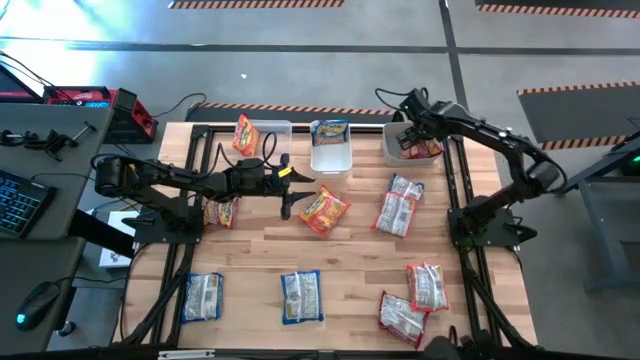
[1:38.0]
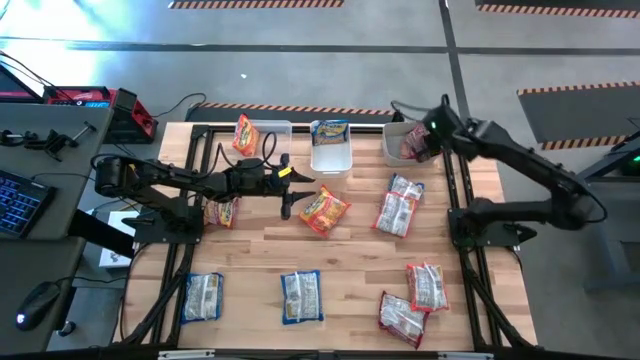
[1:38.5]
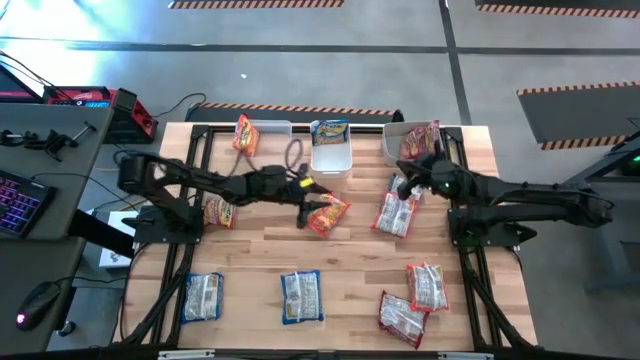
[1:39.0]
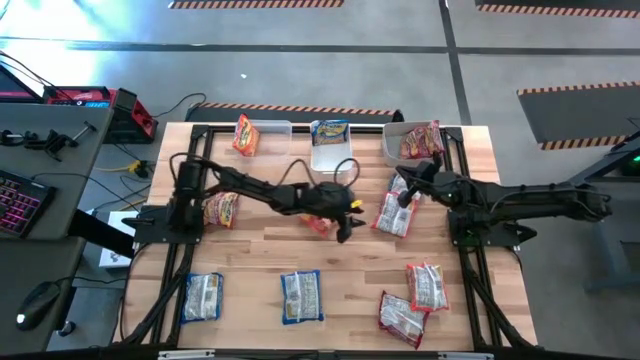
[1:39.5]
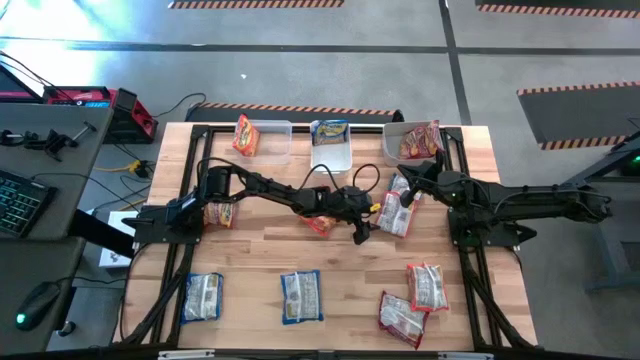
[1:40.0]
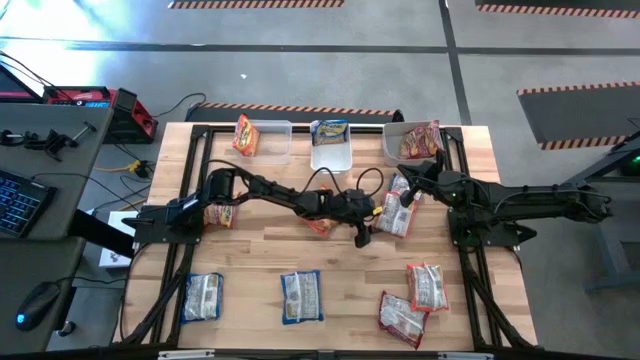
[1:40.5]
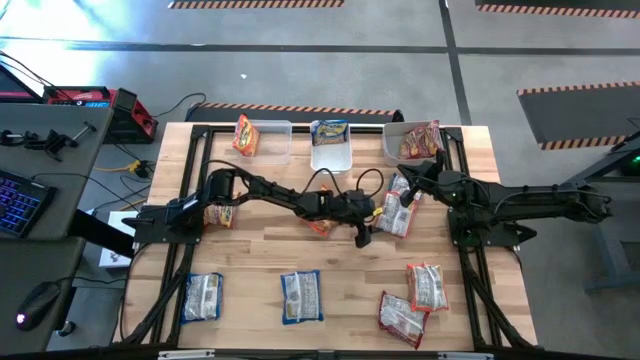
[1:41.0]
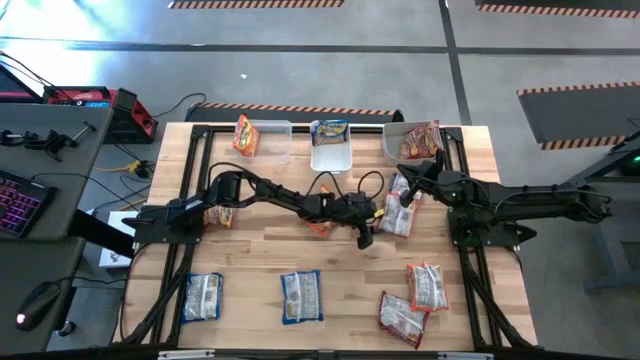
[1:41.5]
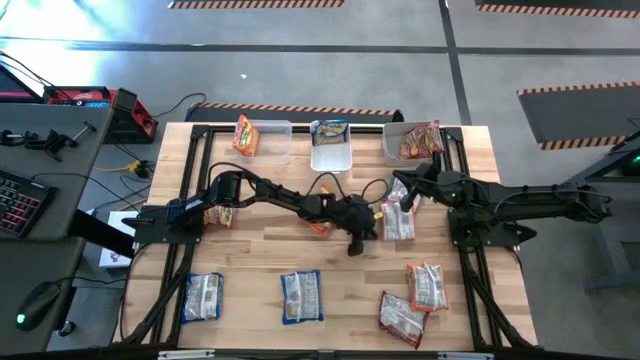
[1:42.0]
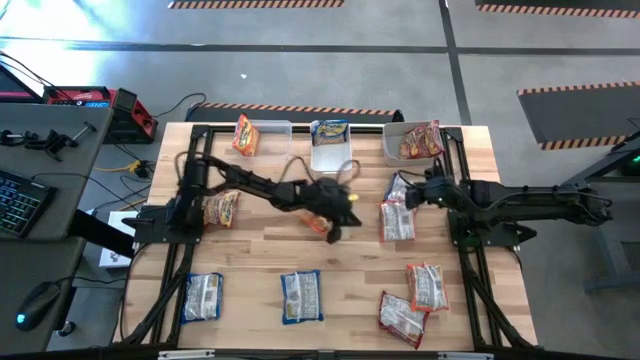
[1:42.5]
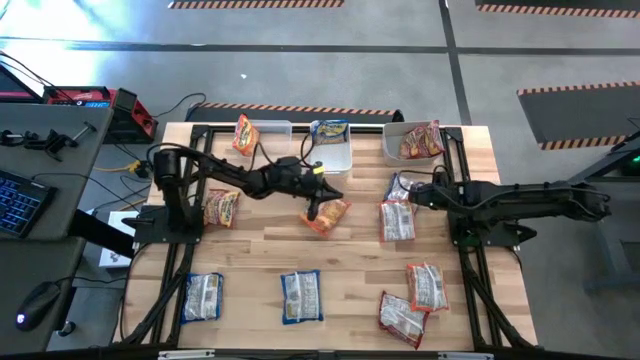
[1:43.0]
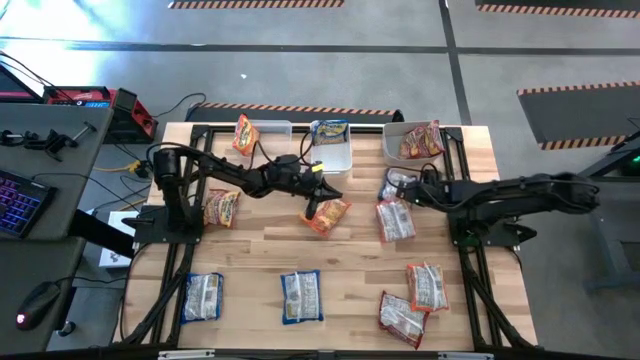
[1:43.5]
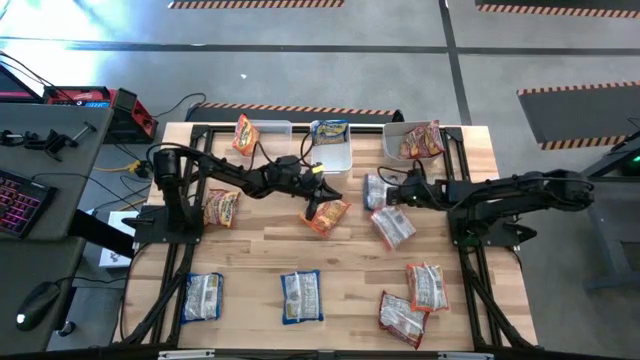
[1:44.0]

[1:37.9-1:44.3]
Task: Sort Maruchan noodles
Put the top blue noodle pack into the white bin

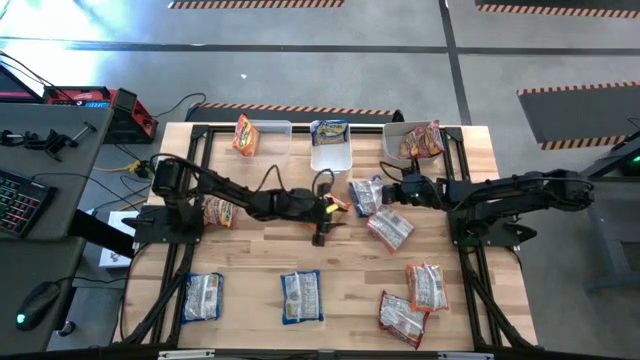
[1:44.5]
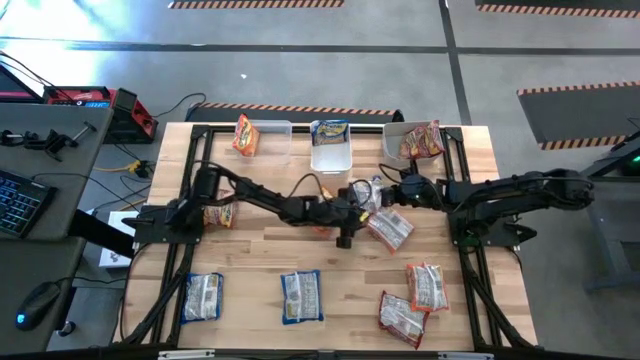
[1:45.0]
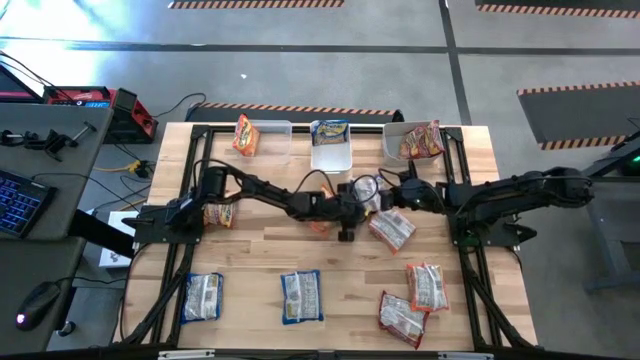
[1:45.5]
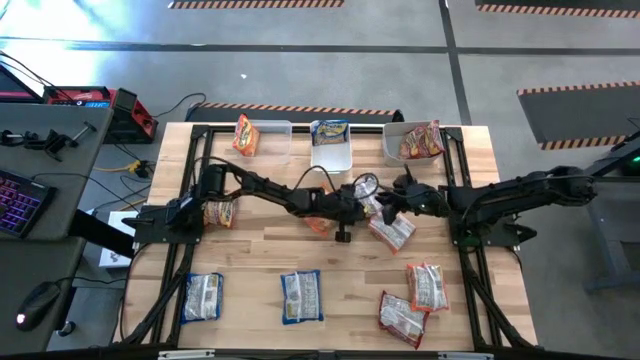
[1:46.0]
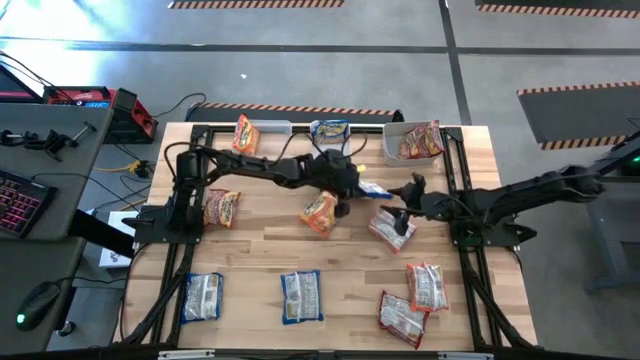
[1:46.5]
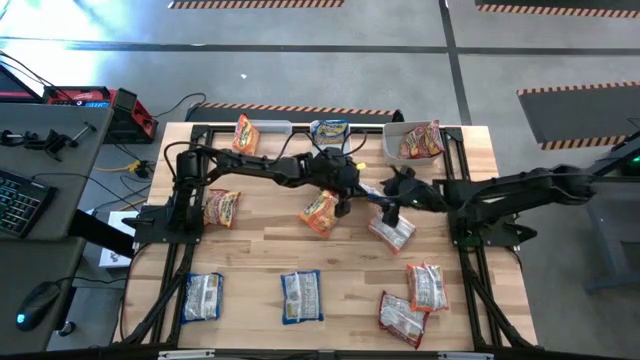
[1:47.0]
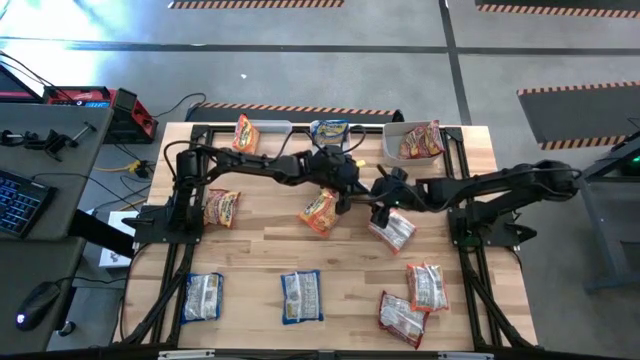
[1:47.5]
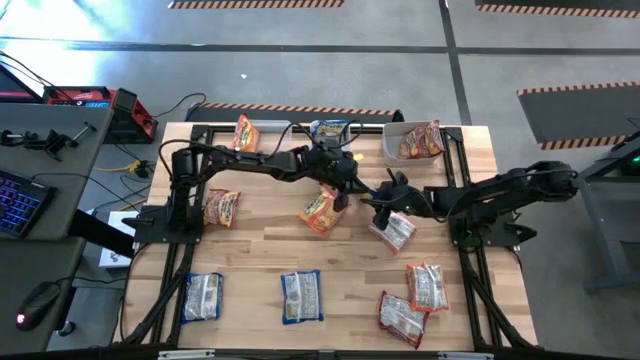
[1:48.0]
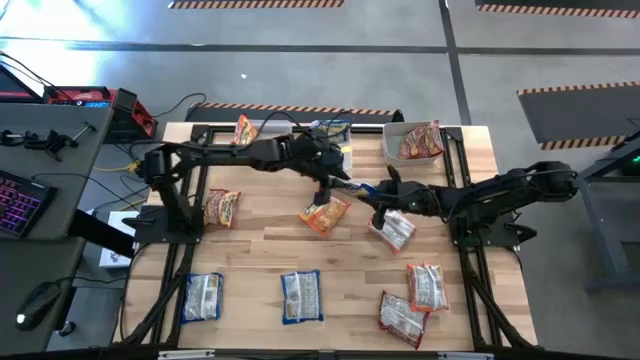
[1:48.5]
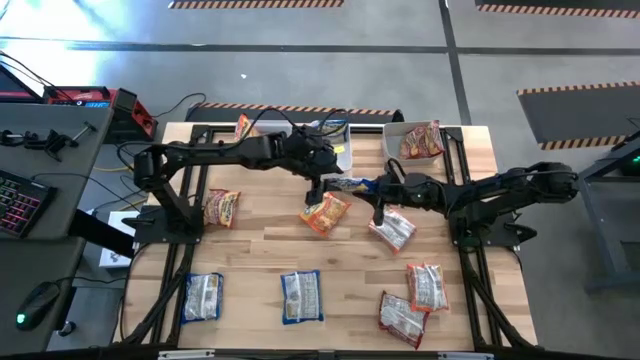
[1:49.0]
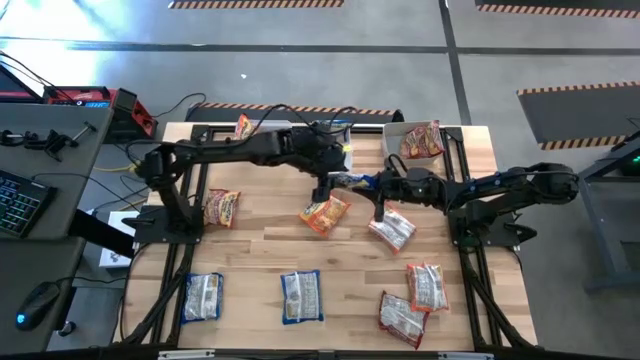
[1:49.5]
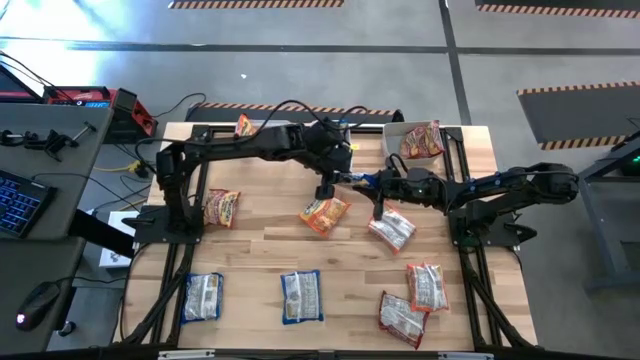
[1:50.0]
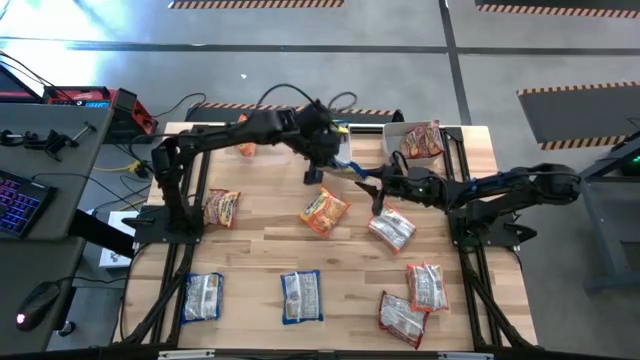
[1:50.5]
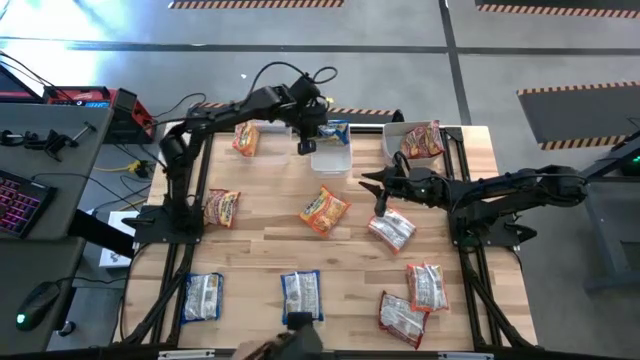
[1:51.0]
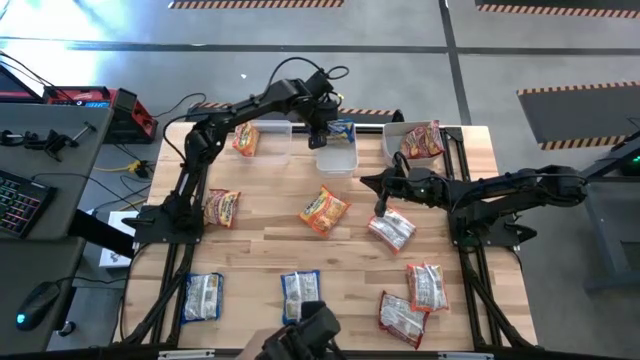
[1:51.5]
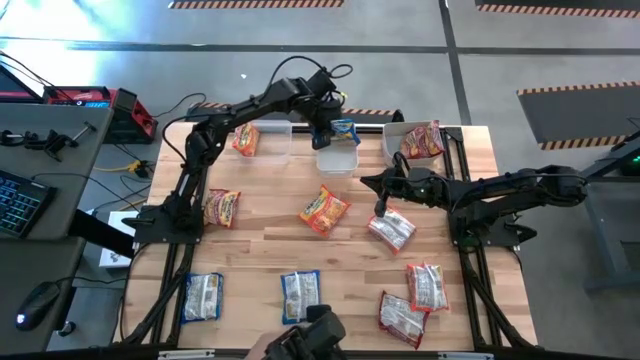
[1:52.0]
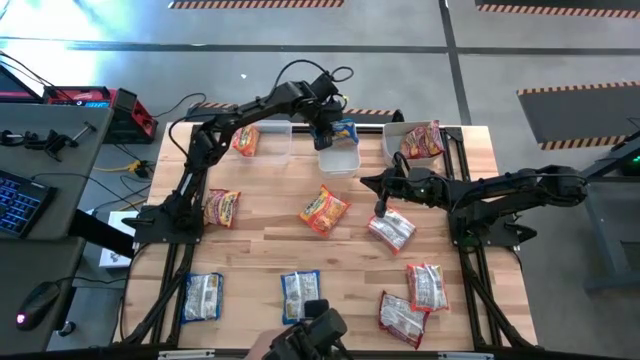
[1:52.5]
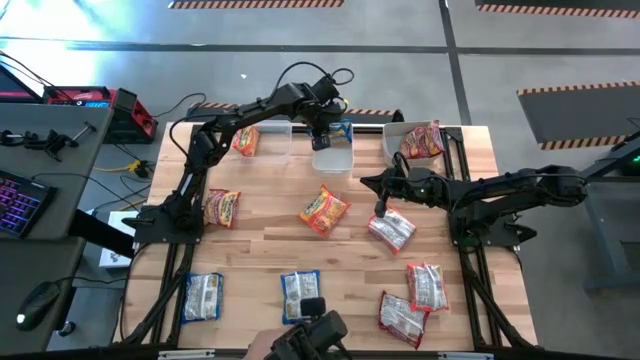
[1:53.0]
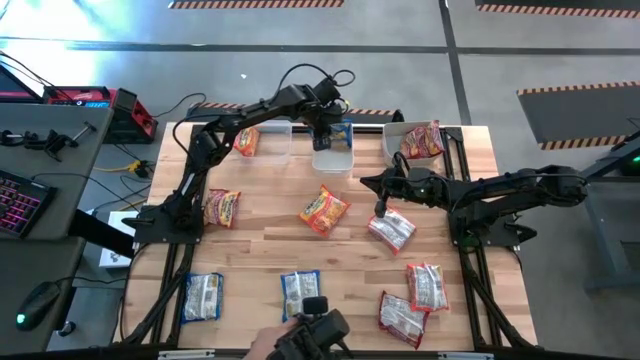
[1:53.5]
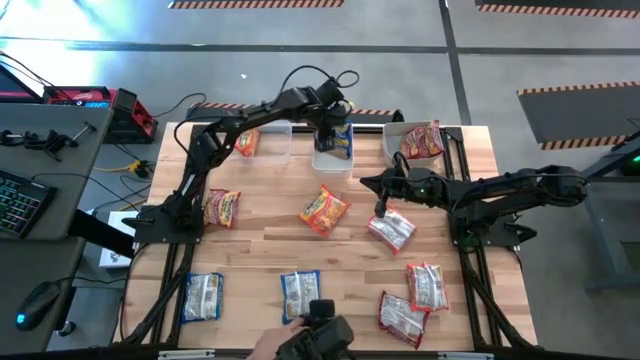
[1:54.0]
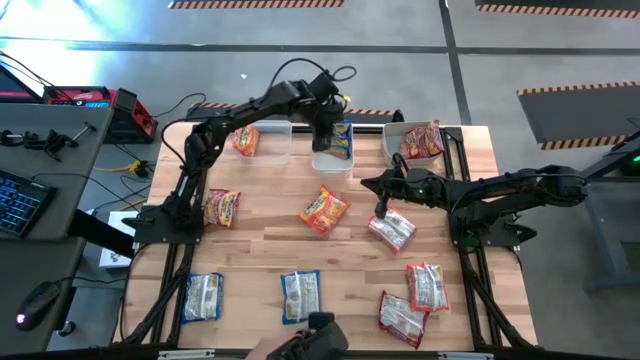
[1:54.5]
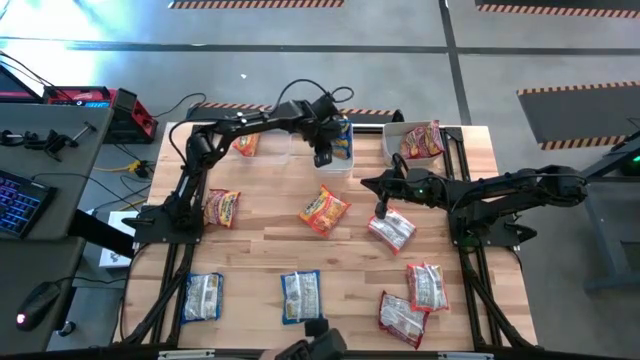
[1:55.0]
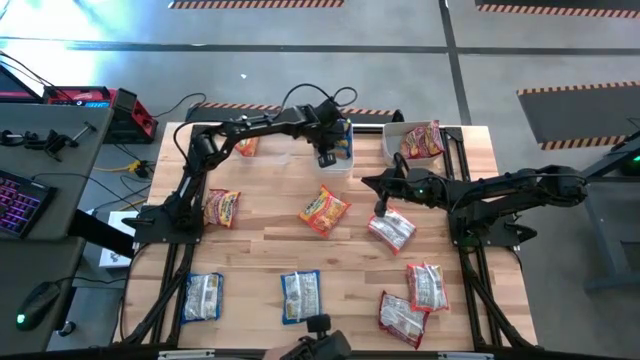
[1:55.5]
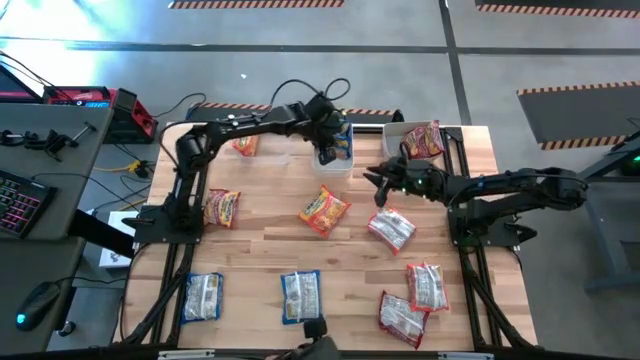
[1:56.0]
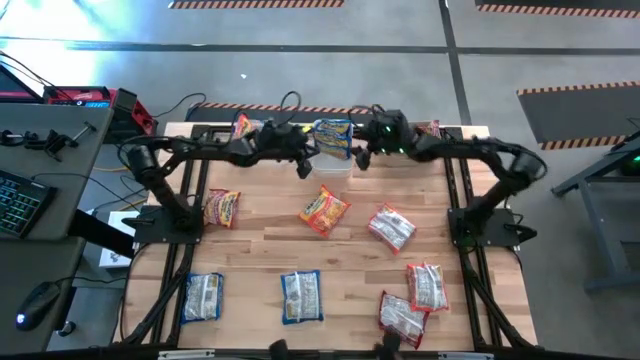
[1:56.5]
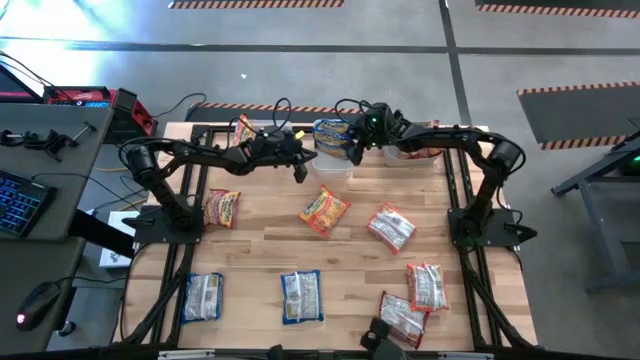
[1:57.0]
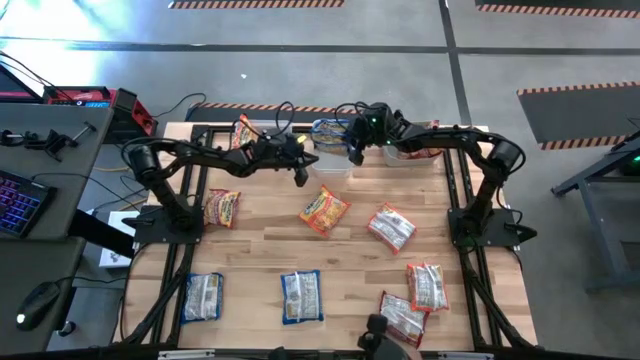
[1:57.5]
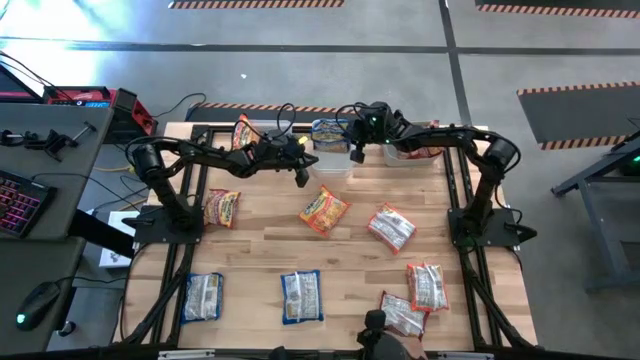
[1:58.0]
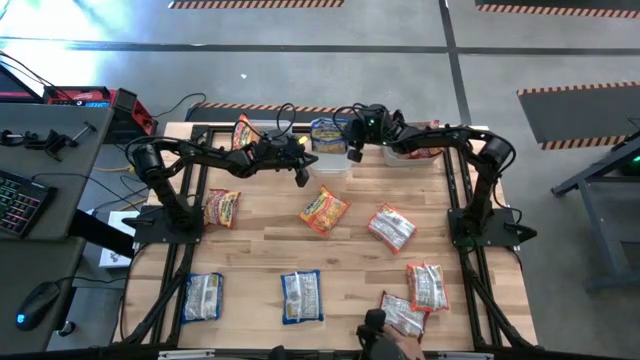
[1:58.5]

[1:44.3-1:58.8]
Put the top blue noodle pack into the white bin
